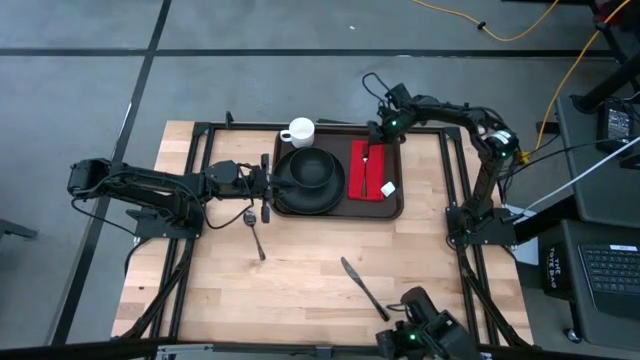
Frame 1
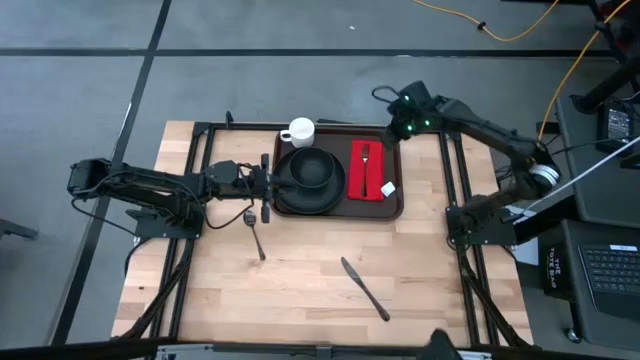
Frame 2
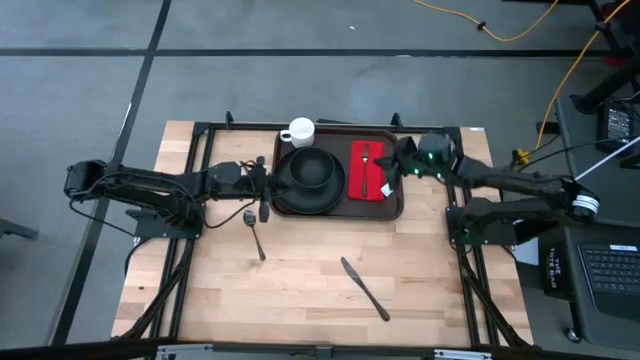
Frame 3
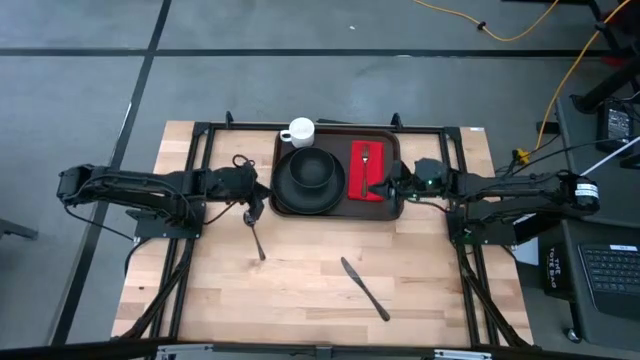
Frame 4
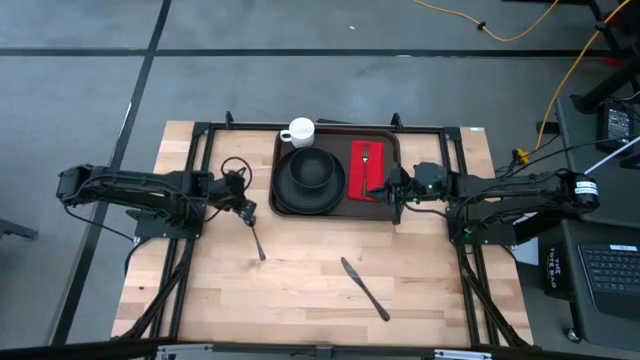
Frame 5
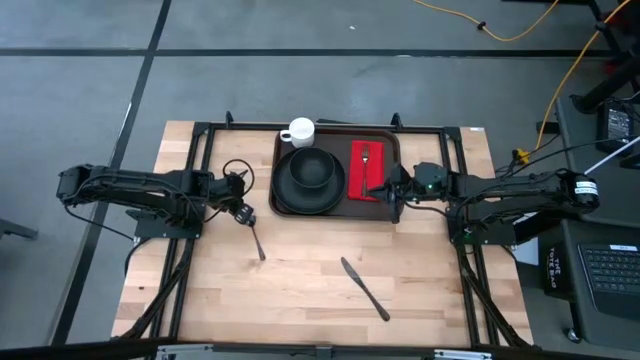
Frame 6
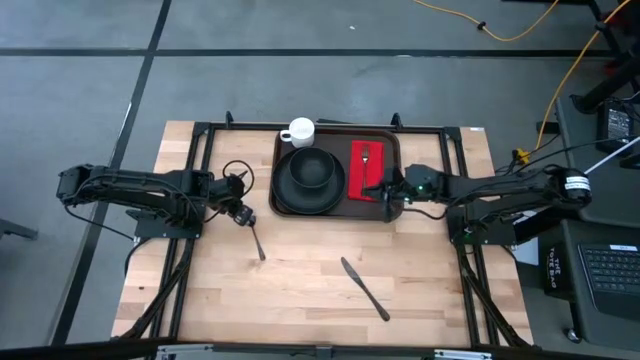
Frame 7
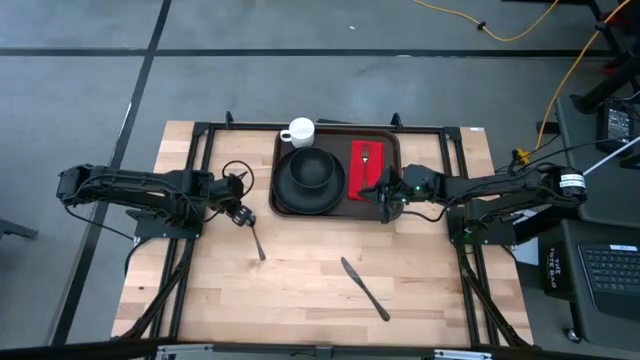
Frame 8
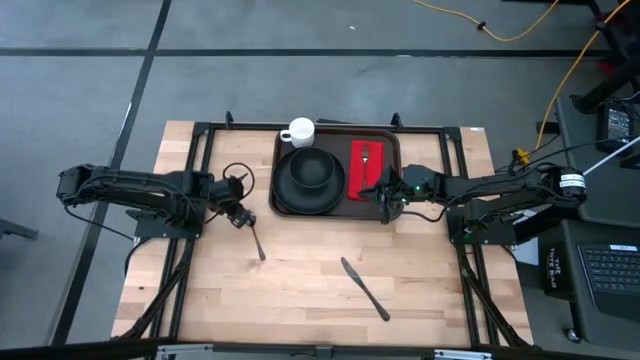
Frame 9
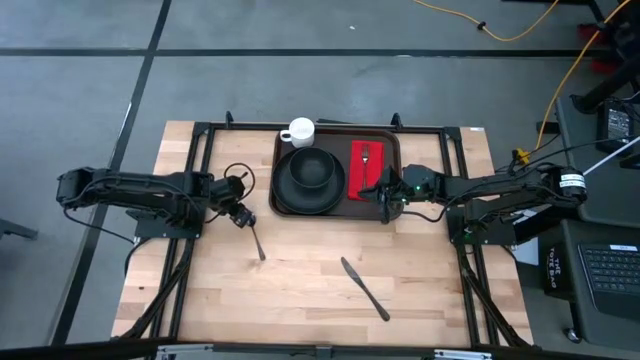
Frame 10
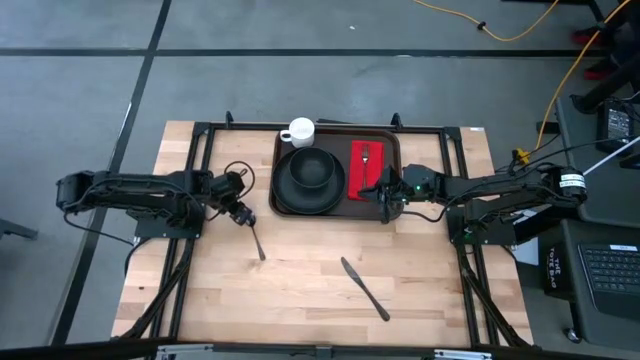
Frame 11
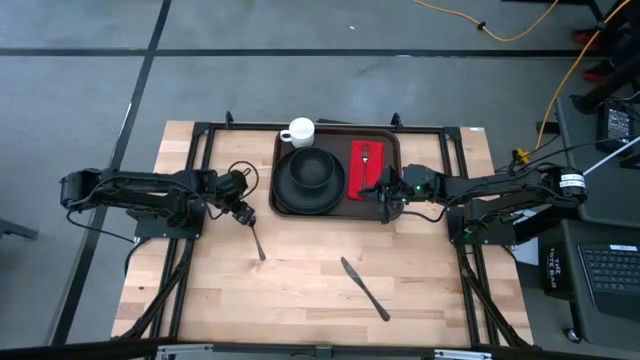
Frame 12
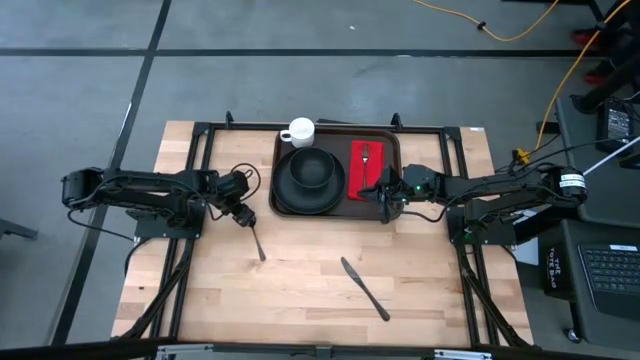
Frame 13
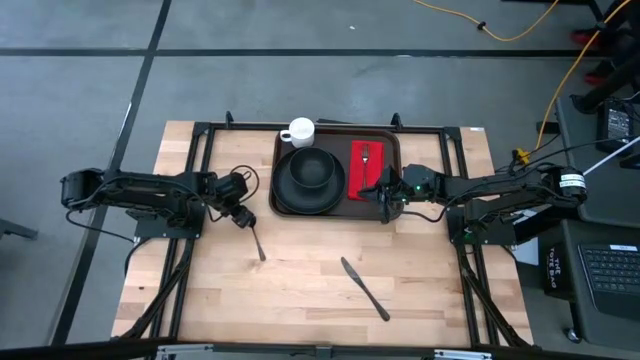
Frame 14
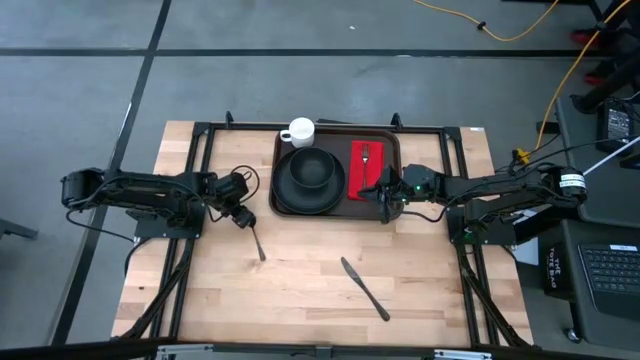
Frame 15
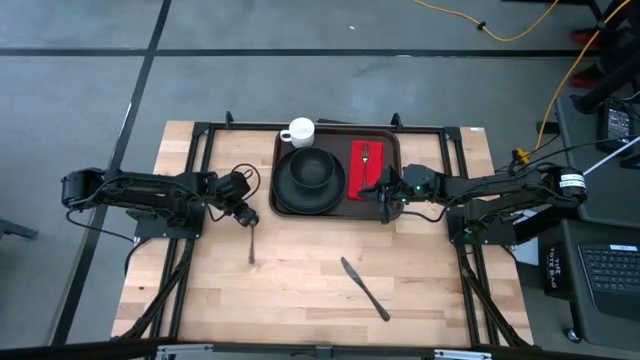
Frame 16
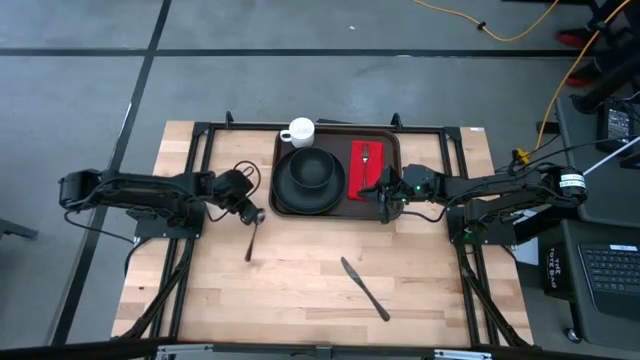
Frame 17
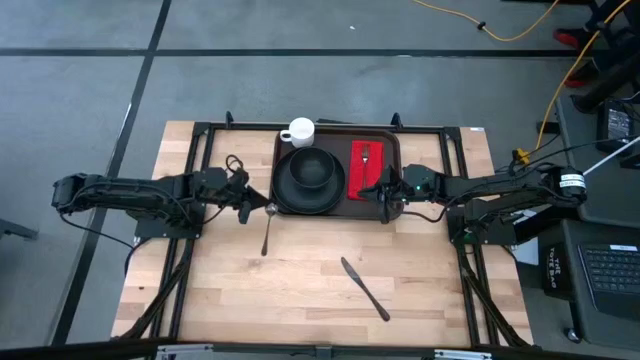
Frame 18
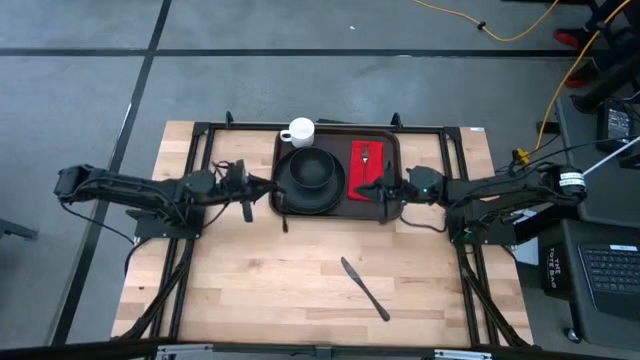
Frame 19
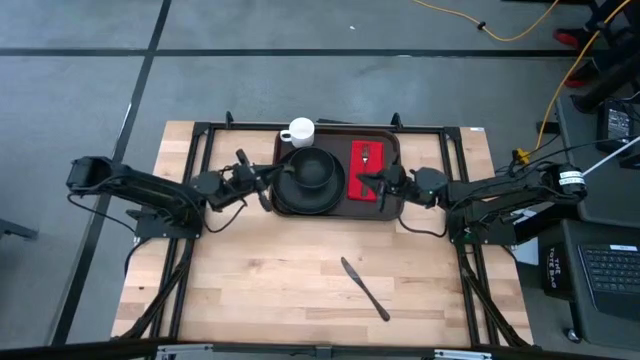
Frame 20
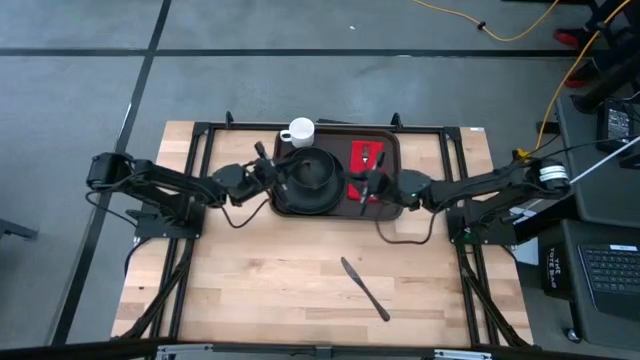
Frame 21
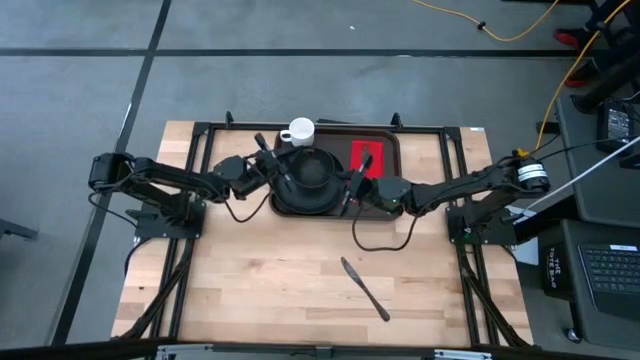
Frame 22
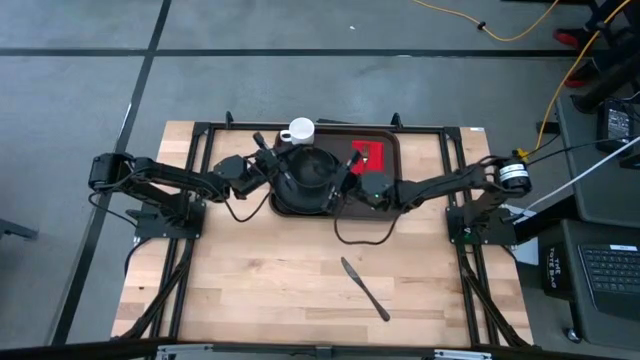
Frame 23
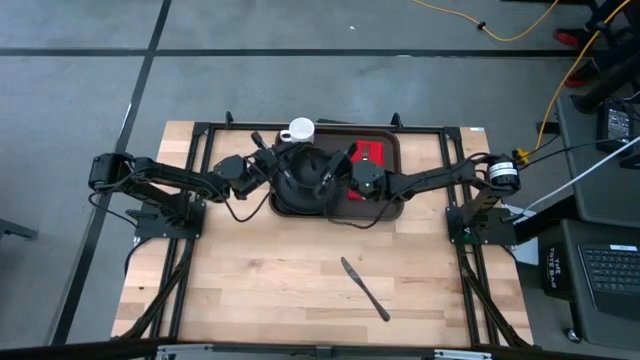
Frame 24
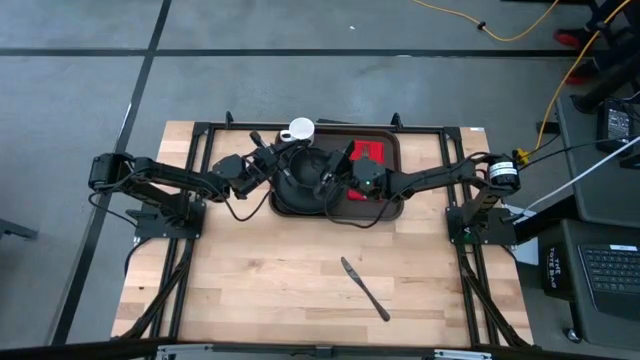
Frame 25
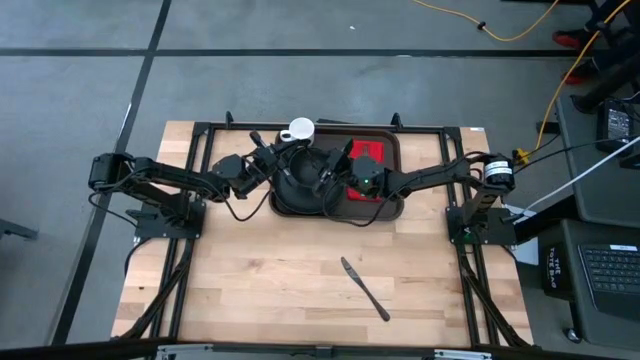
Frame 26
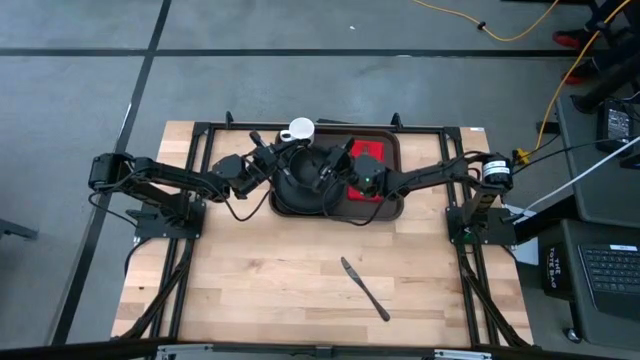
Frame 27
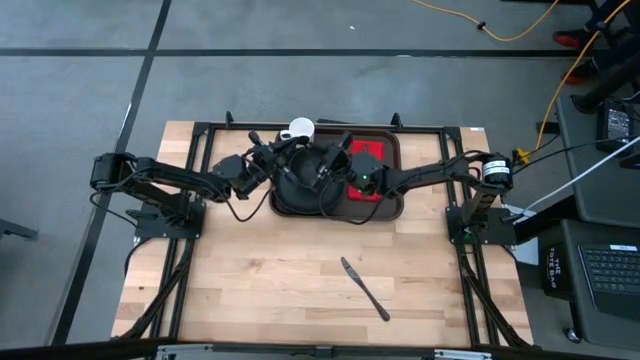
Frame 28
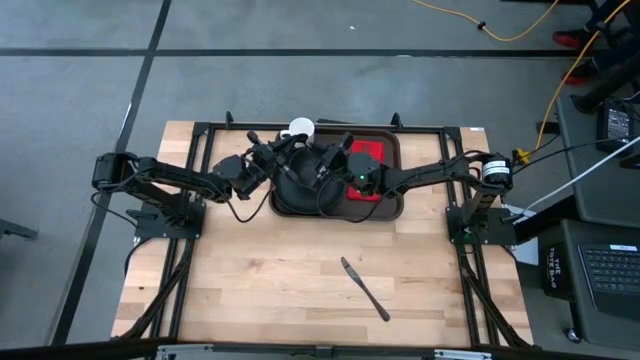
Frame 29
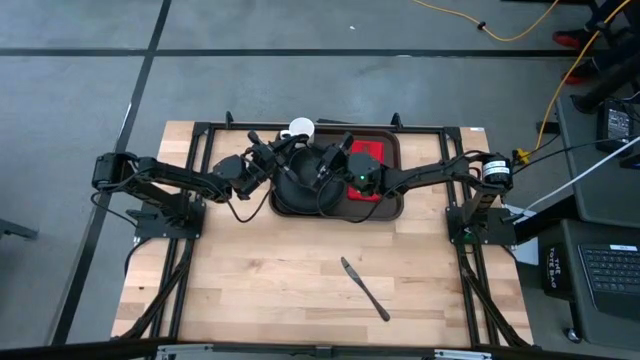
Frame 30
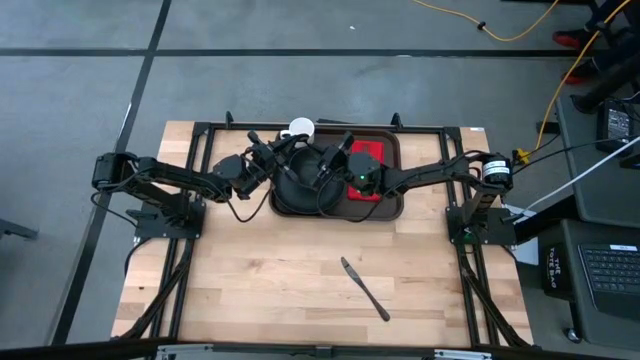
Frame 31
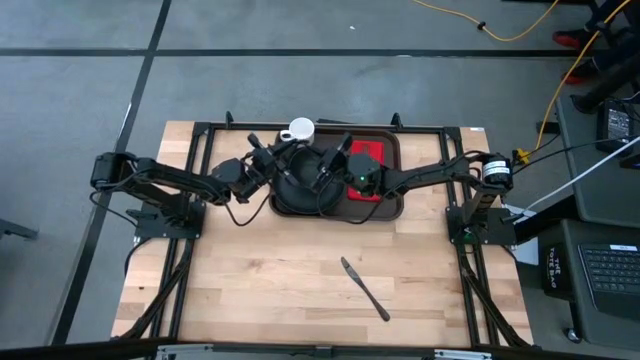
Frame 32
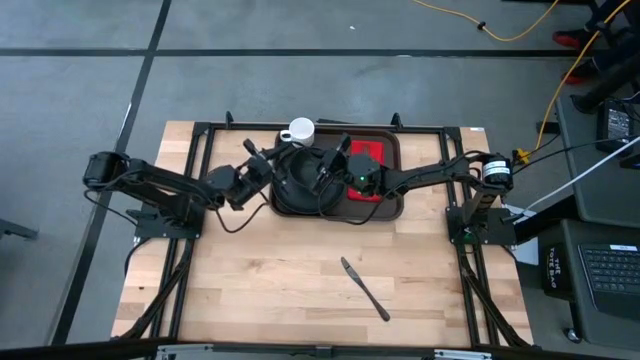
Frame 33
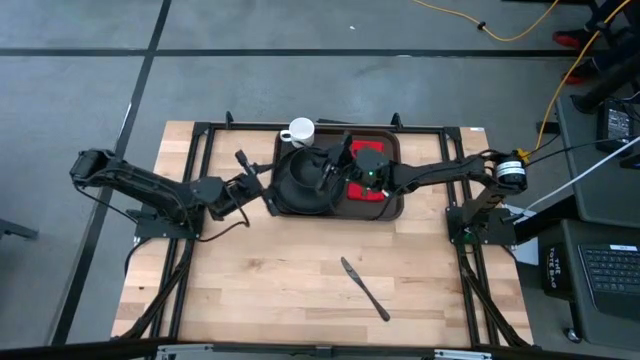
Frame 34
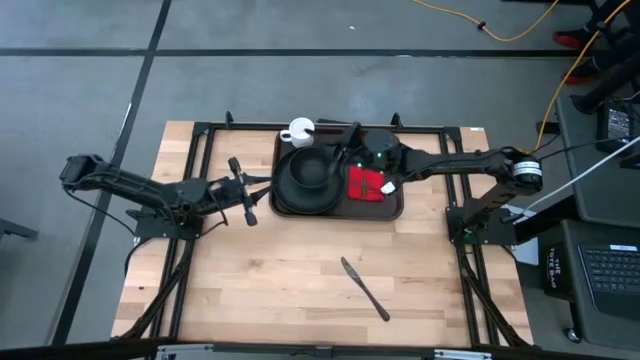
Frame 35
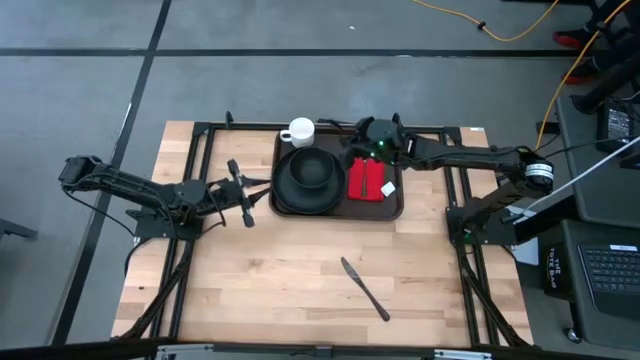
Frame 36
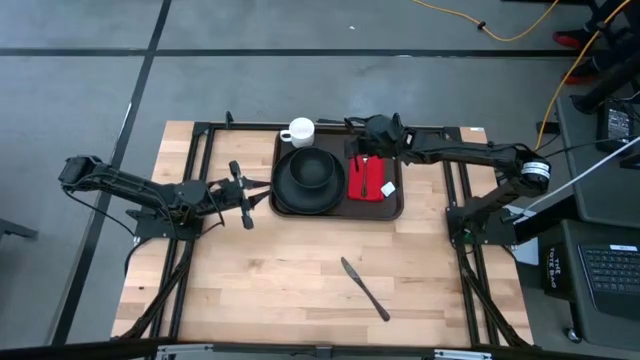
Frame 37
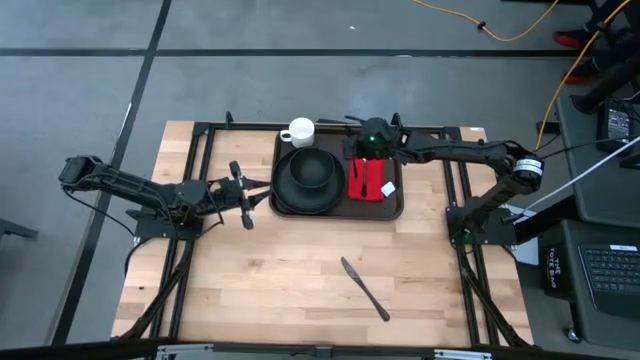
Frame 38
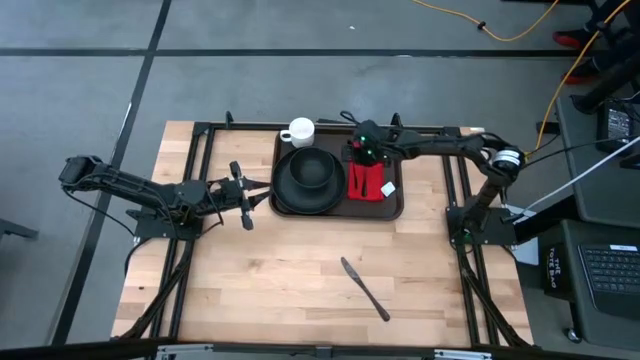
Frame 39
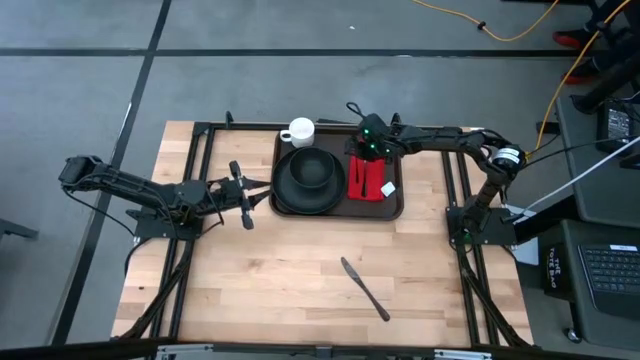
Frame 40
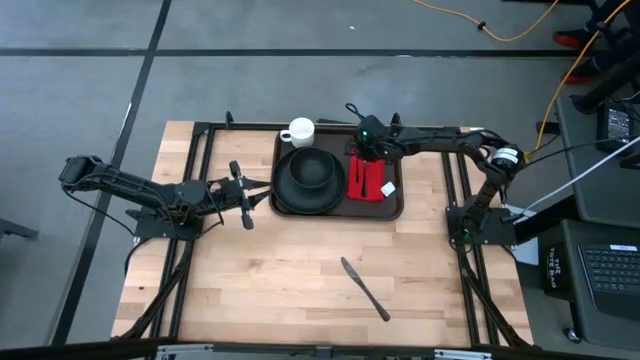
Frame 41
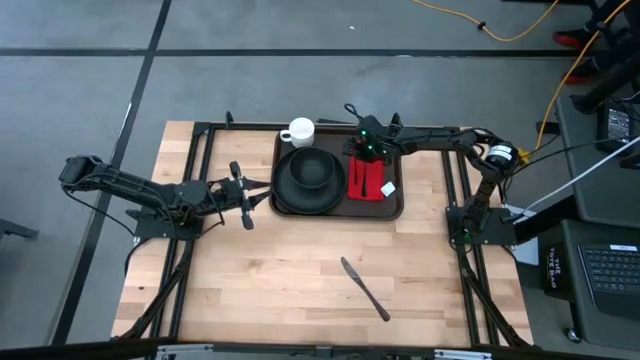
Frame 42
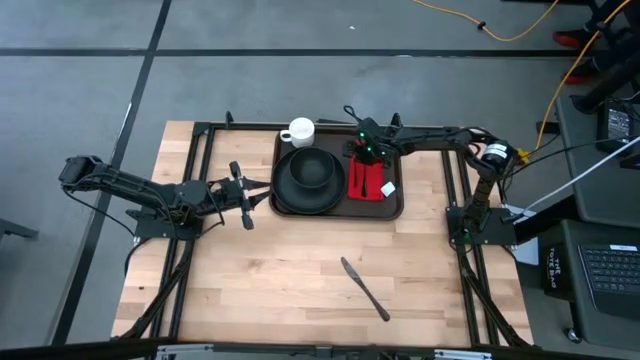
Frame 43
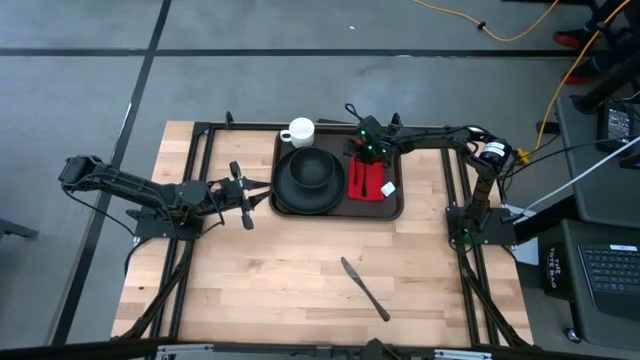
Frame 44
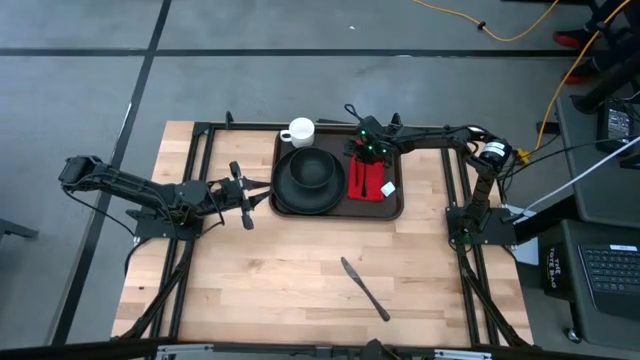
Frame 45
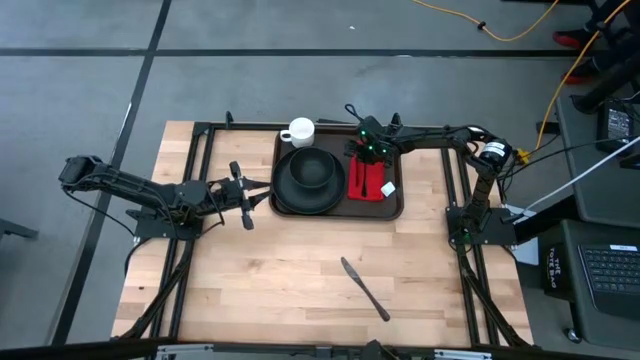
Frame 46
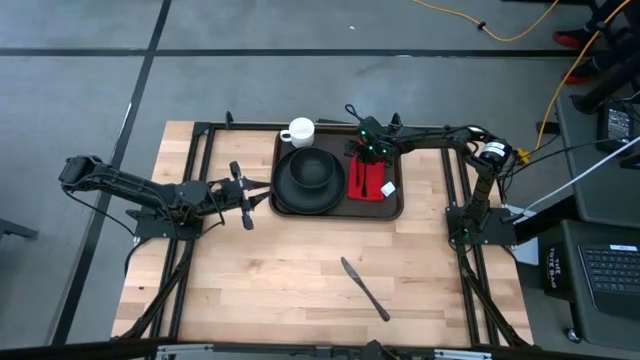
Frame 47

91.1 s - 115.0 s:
Task: Set up tray
Put the black spoon to the left of the black fork on the red napkin on the brown serving tray
